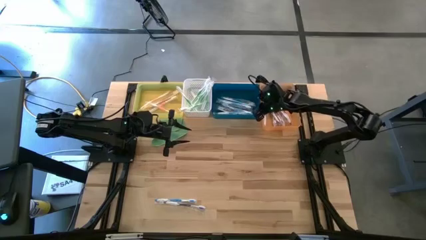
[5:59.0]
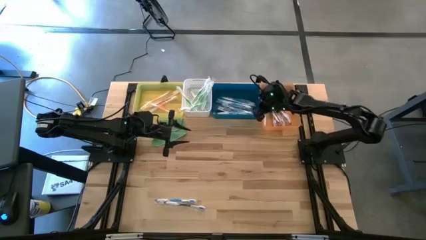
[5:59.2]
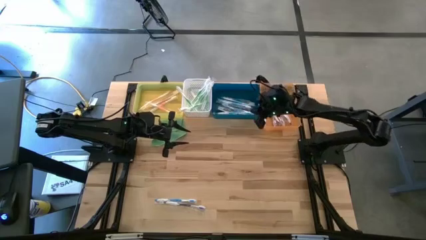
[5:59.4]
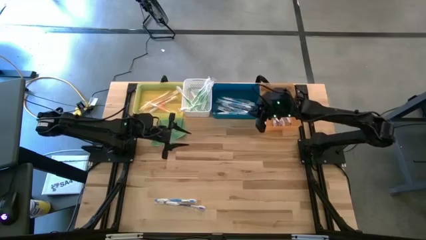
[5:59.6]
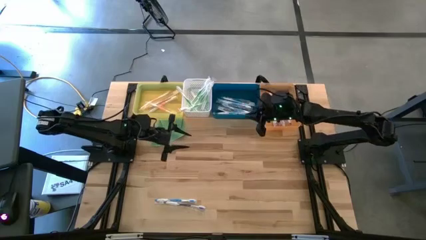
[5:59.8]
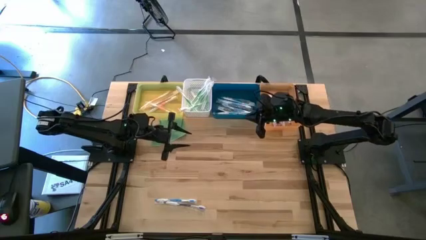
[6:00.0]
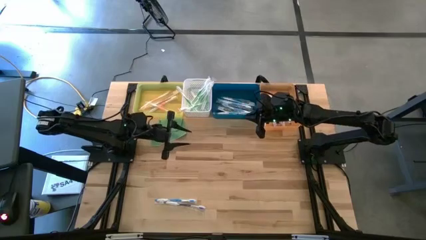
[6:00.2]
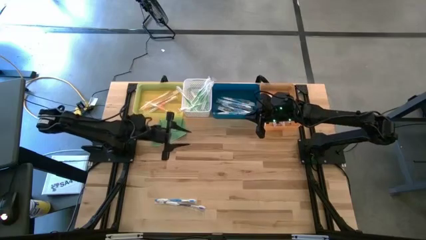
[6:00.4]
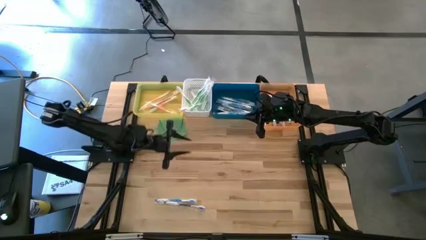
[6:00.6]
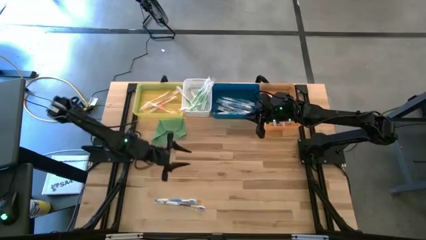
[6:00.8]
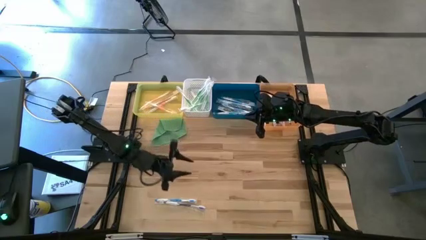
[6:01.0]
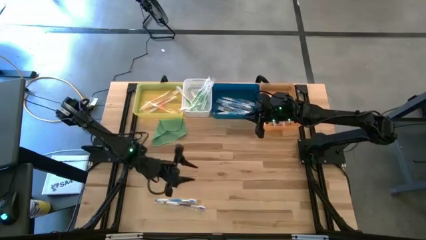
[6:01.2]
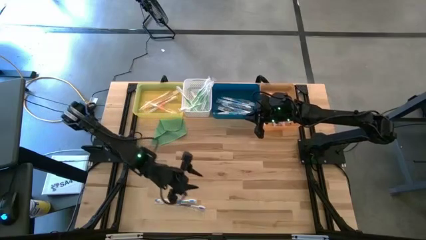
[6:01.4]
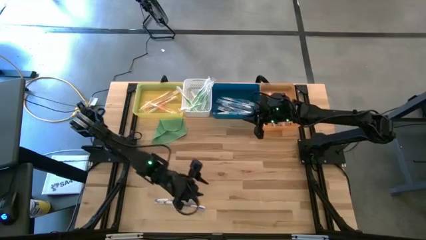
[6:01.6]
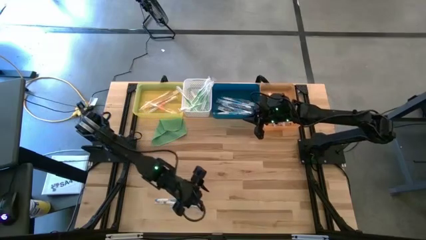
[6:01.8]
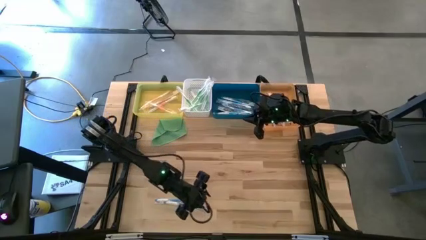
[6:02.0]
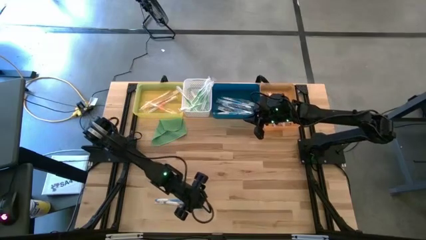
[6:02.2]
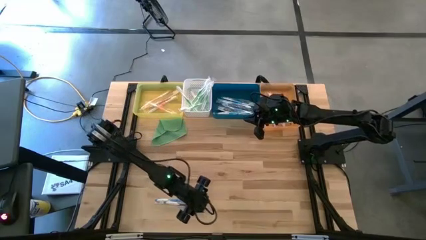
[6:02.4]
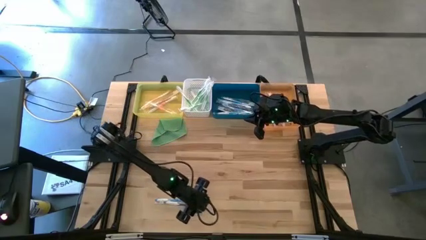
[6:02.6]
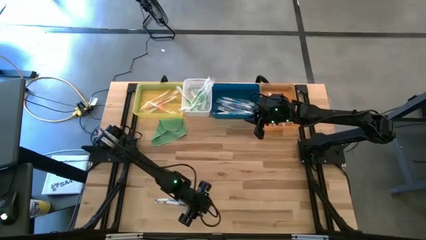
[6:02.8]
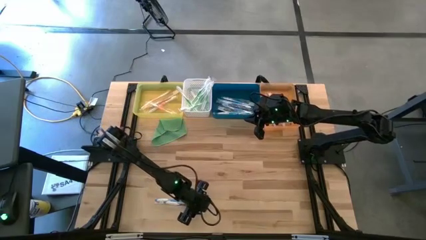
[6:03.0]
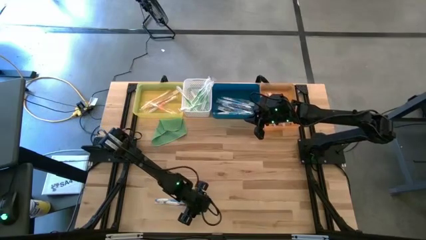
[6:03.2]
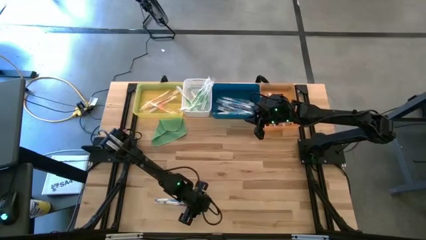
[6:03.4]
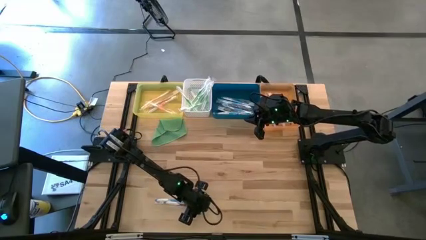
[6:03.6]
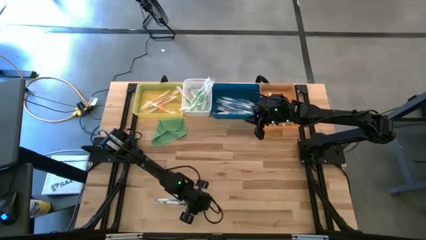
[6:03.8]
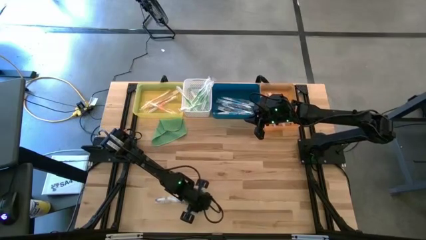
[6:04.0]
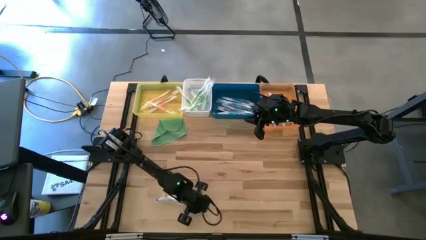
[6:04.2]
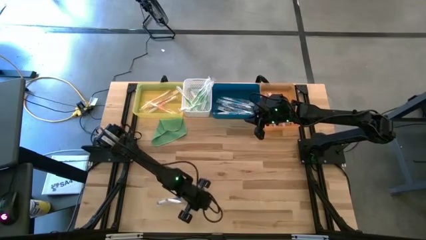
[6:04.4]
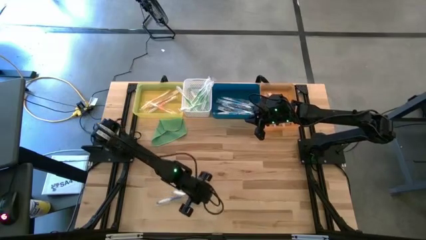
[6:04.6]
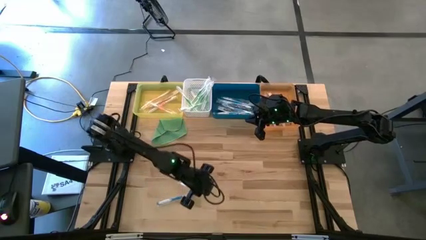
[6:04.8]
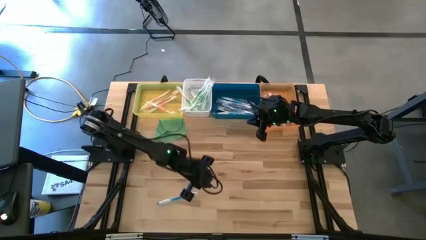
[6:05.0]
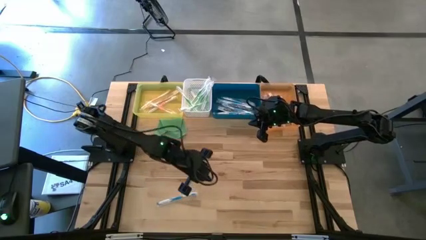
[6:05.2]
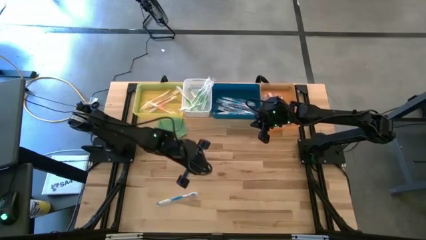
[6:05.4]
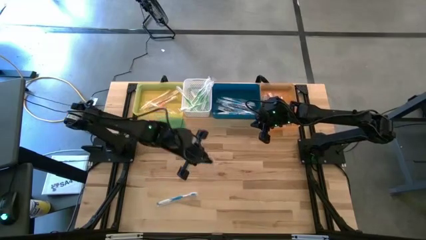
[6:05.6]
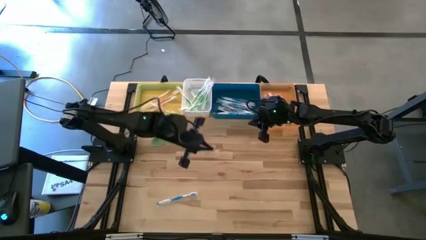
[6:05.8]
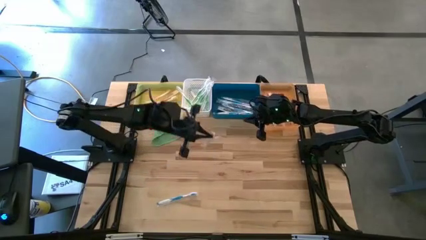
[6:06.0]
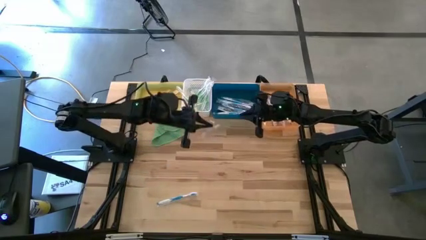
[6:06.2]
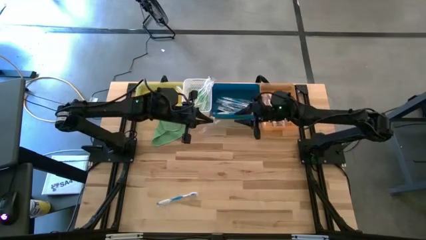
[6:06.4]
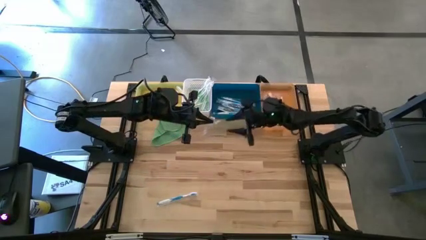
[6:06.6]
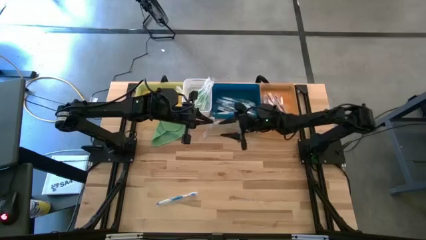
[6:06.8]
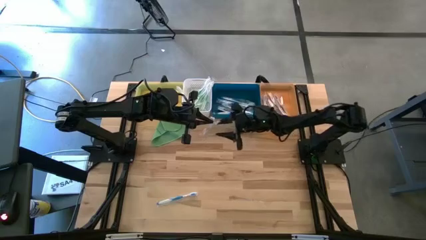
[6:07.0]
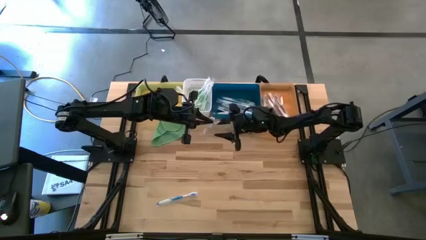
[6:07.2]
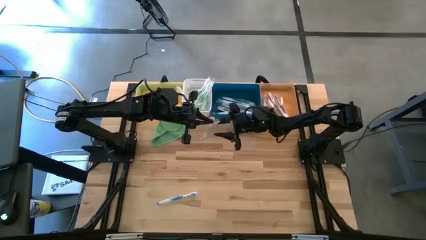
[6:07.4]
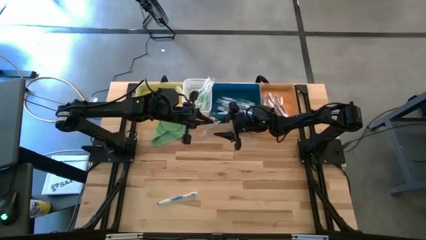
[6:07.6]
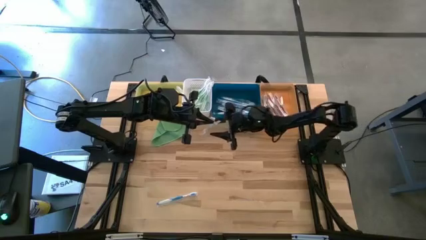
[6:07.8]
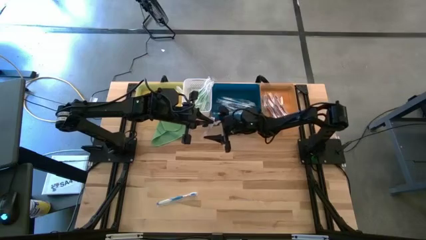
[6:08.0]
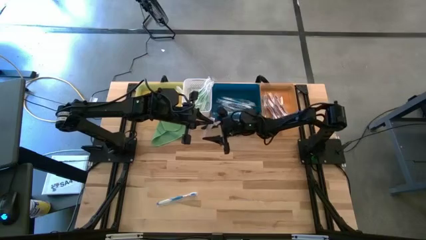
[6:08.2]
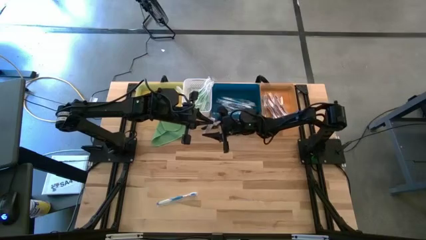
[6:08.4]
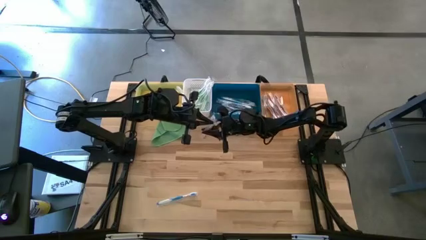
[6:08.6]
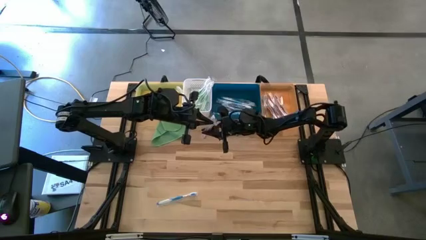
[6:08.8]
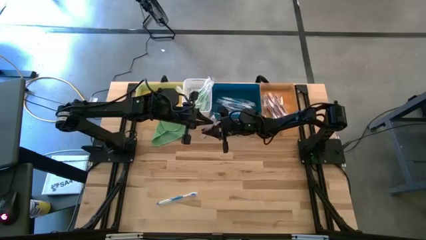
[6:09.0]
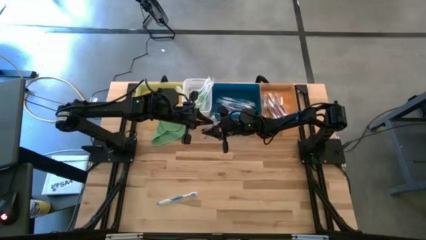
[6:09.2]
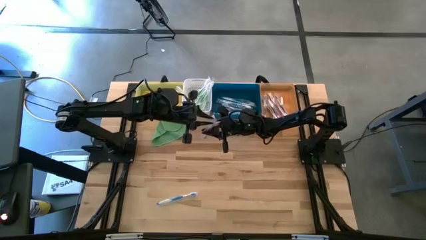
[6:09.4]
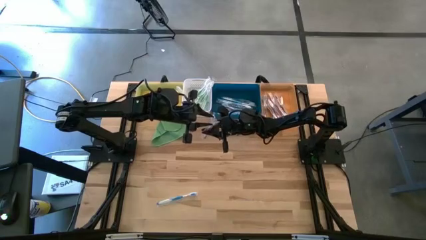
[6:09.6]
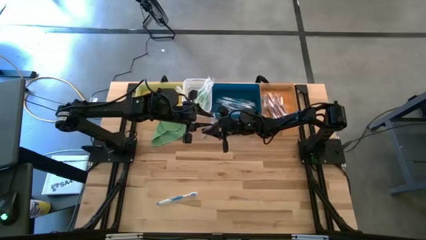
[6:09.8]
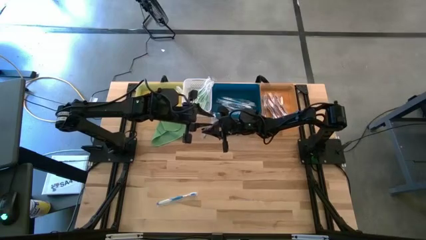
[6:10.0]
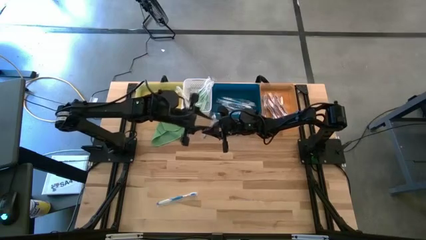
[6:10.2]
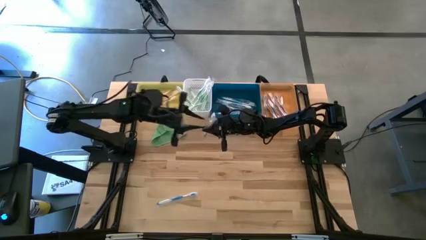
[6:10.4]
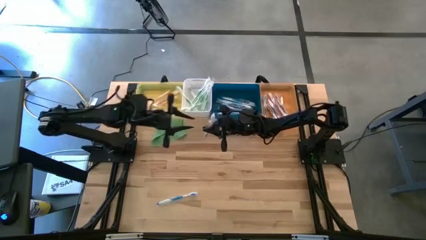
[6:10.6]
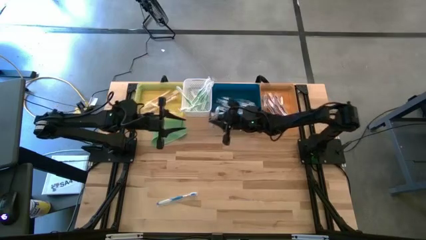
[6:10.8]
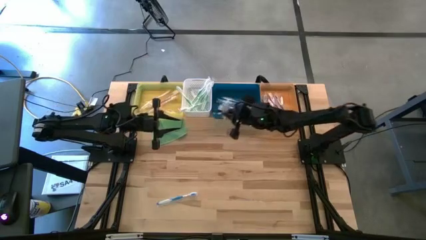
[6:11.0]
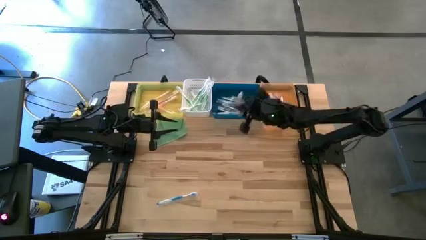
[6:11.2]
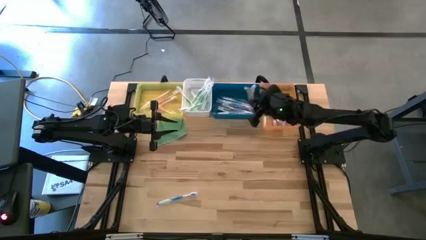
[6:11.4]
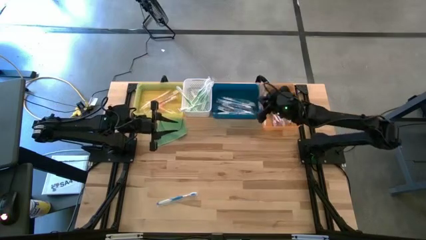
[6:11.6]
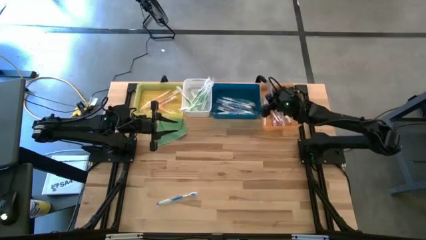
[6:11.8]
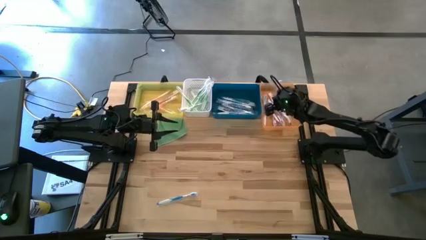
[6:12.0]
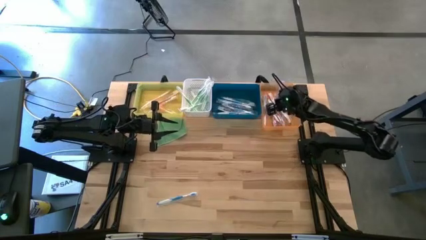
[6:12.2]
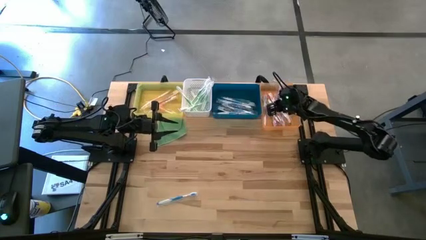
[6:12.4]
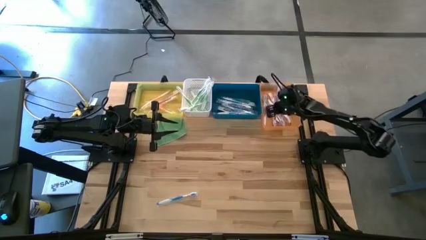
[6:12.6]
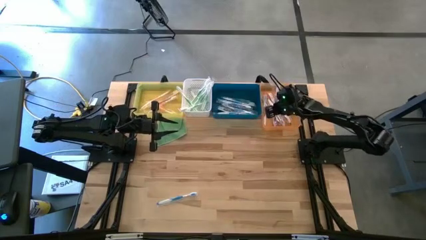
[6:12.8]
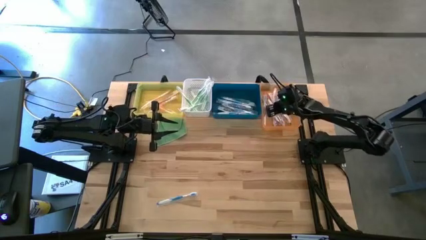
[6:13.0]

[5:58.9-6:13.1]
Task: Pick & Place Toothbrushes
Put the violet toothbrush into the orange bin
